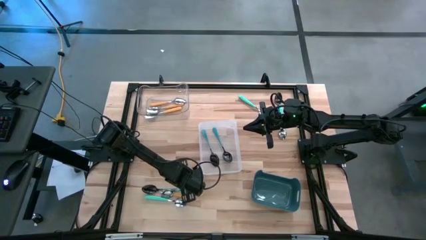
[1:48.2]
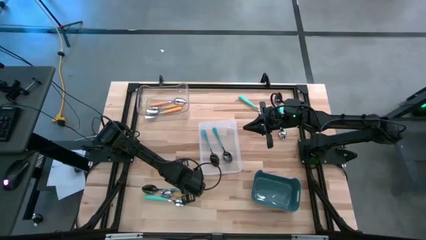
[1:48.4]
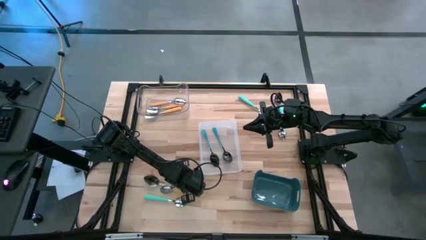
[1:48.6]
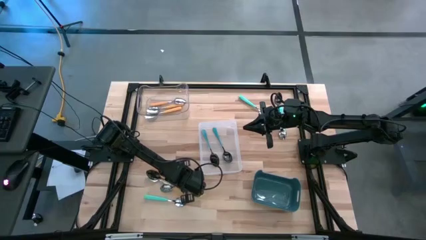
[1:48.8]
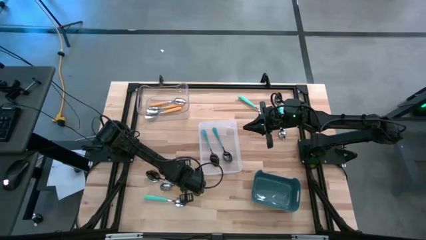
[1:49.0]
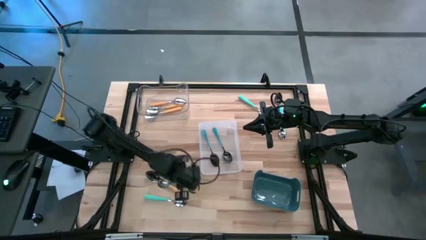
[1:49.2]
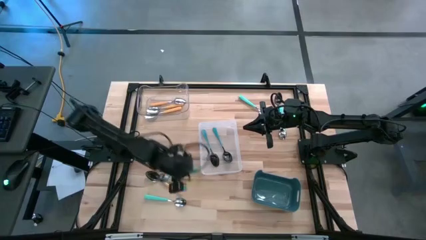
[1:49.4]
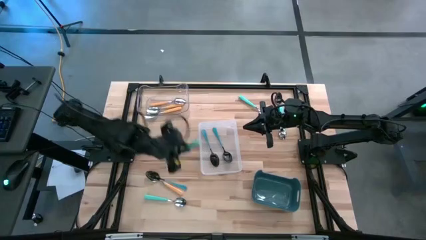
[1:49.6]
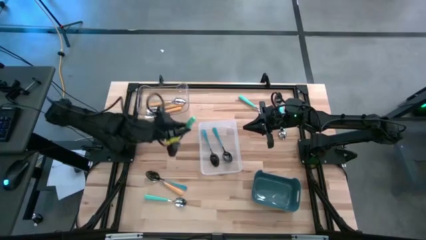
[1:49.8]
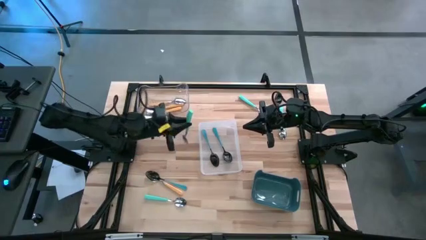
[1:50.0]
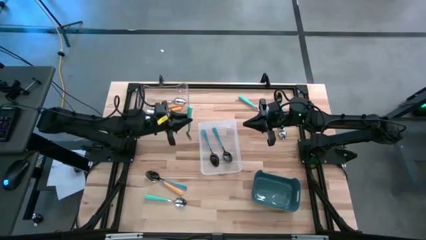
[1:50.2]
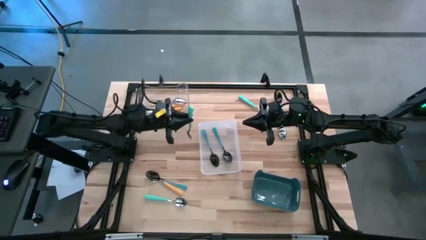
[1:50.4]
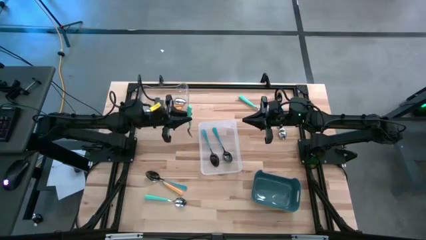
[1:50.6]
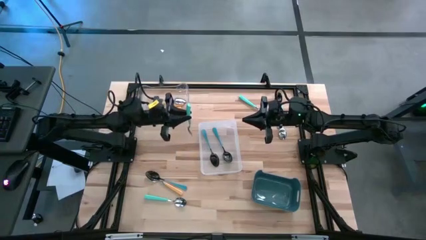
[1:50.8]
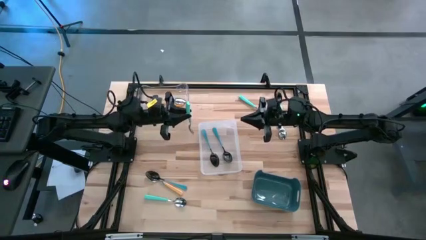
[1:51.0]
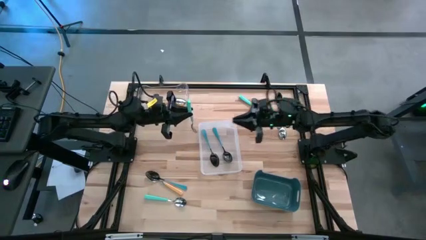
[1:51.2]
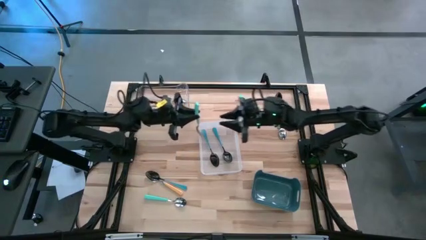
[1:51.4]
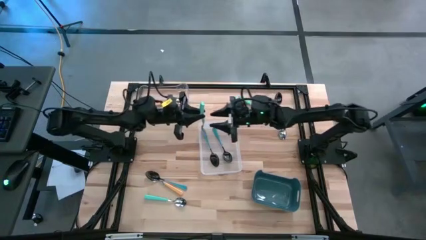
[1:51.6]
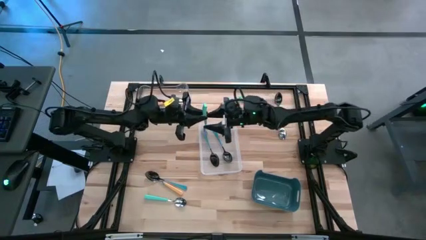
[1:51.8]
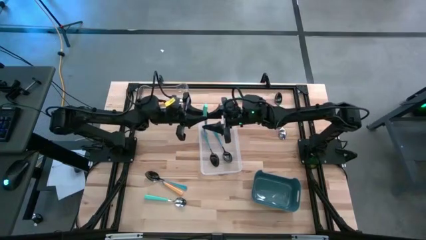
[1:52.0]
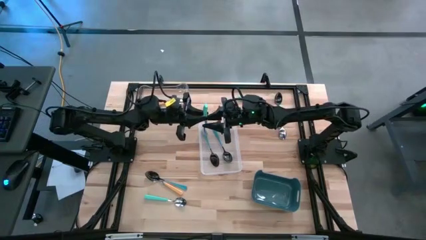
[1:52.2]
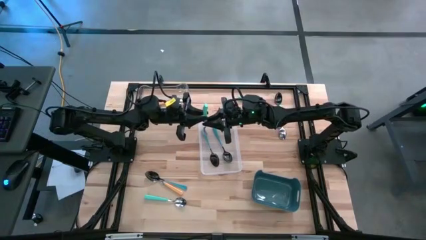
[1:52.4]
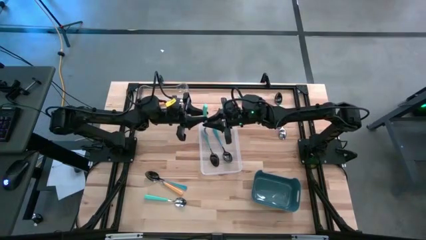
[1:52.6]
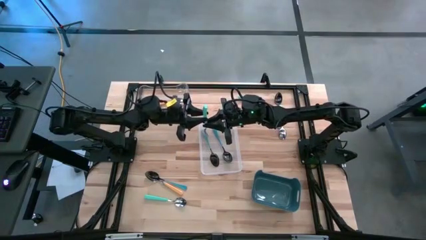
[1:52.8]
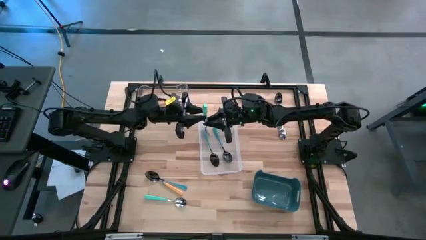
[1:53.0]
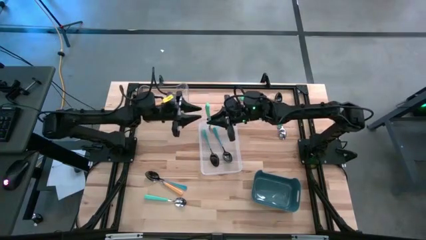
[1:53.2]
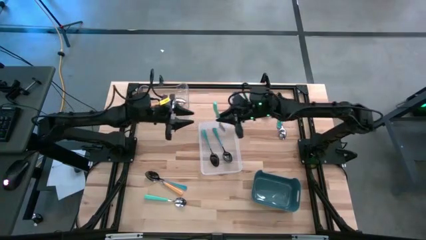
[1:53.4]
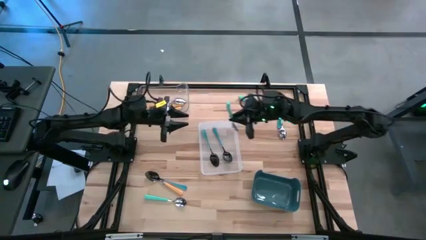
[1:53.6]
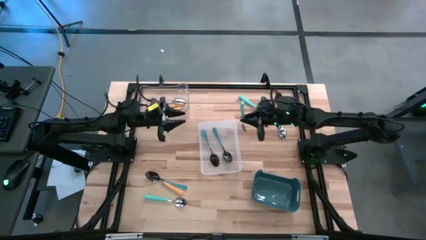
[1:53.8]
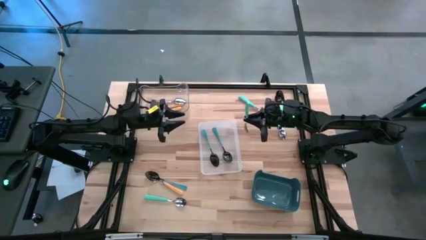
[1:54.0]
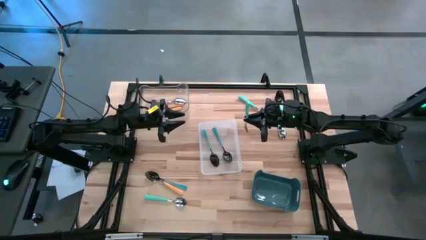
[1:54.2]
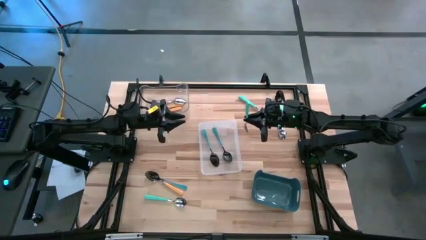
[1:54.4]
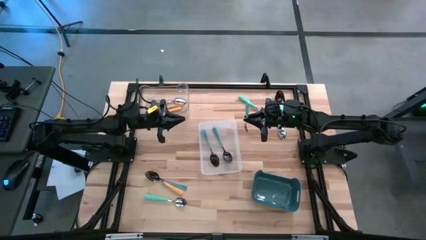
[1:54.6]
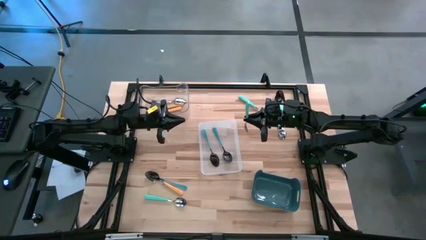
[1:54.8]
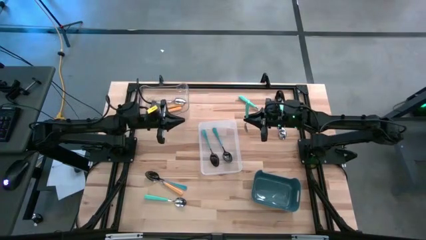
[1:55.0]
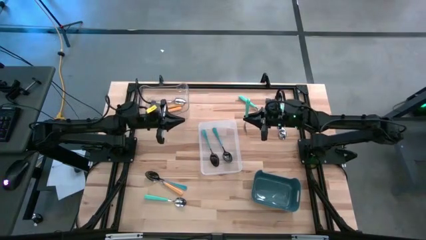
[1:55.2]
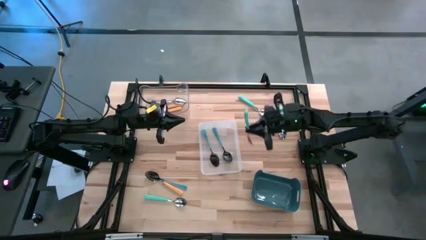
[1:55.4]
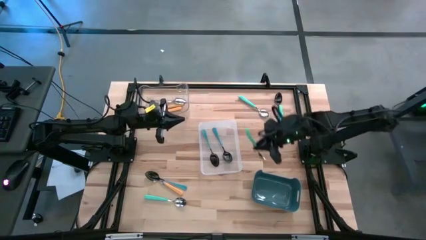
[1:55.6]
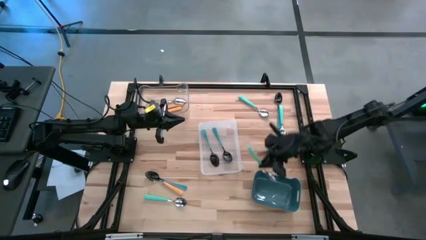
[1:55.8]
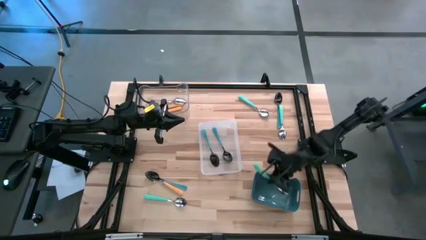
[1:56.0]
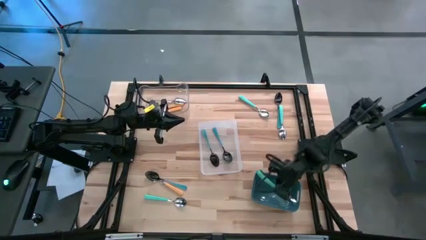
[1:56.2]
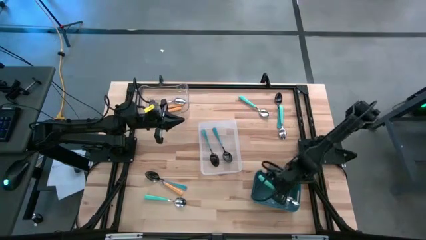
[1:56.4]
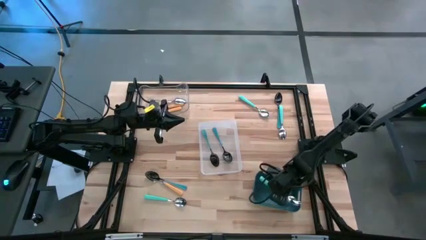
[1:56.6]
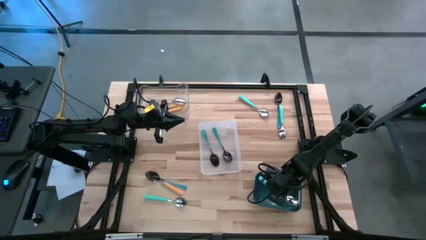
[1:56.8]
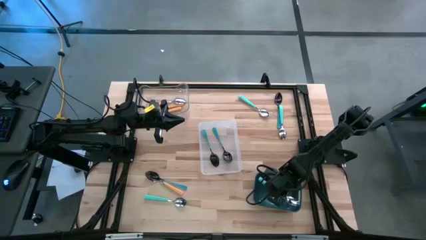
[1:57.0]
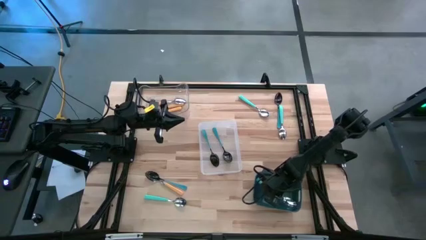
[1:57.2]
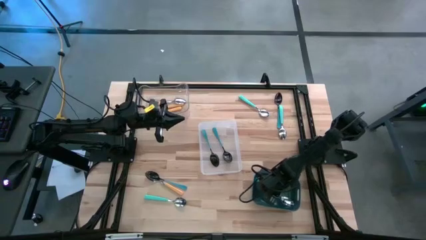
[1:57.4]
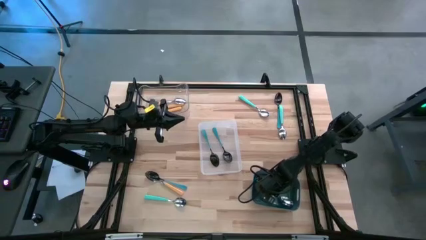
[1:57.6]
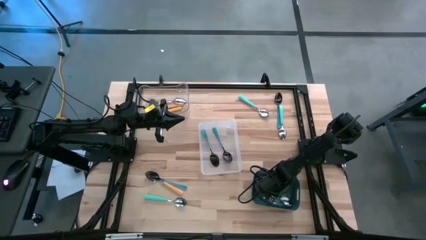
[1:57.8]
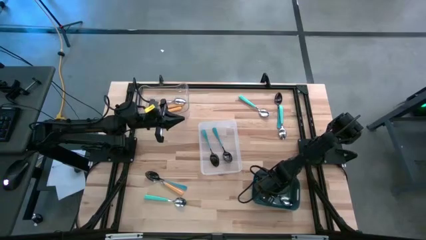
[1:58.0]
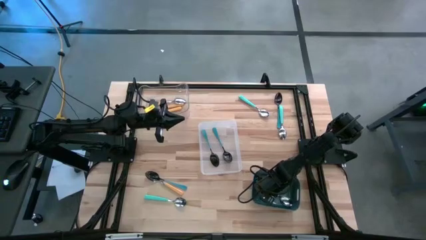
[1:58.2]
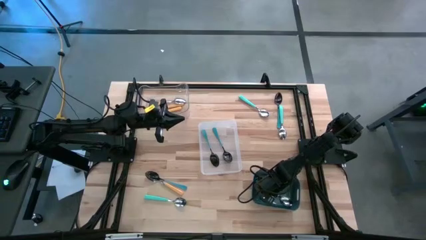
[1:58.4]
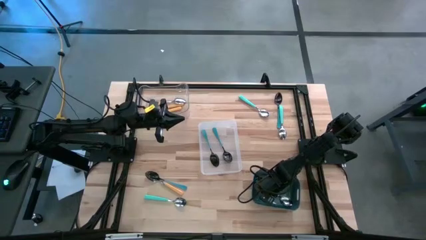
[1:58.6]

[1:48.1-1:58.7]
Task: Sort silverware by color (type)
Put the light blue spoon into the blue bin
